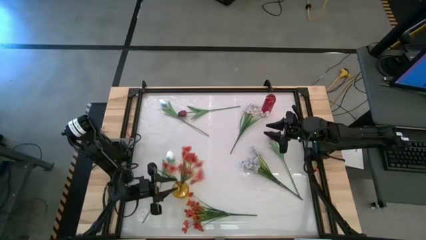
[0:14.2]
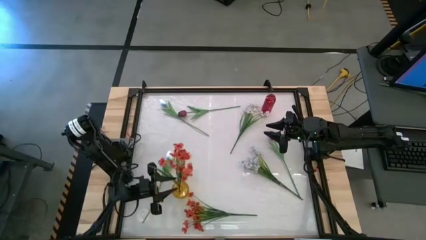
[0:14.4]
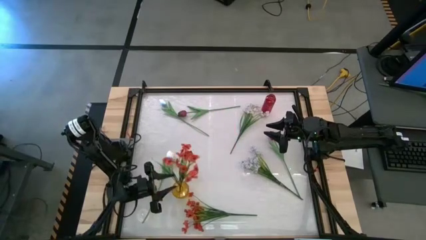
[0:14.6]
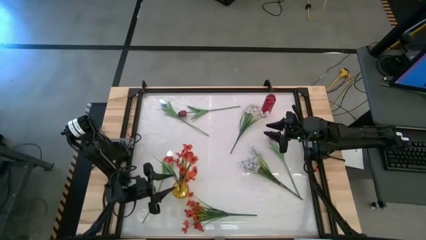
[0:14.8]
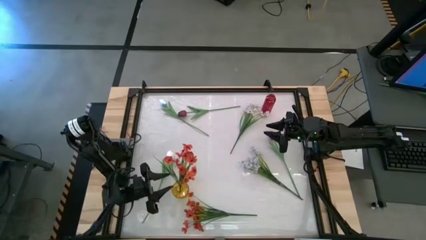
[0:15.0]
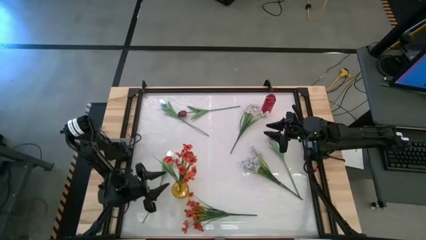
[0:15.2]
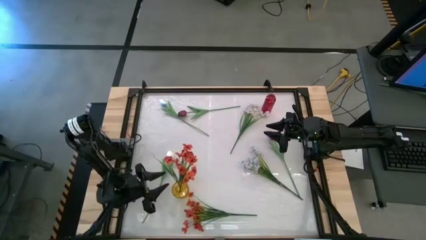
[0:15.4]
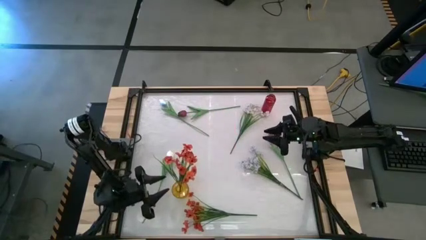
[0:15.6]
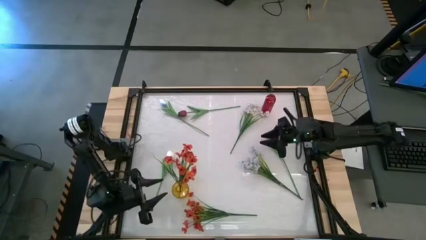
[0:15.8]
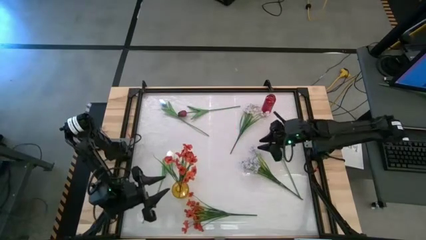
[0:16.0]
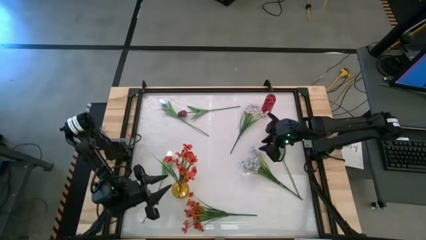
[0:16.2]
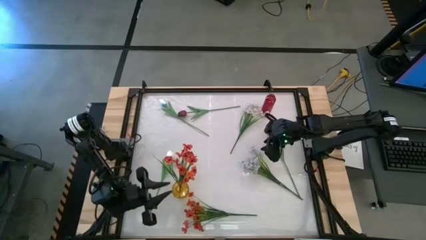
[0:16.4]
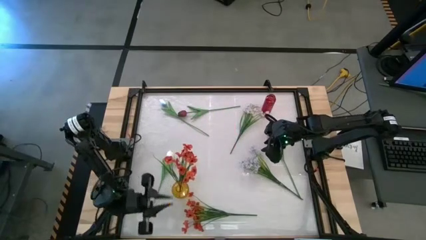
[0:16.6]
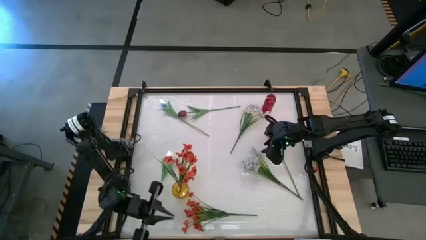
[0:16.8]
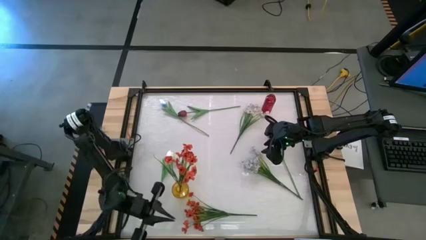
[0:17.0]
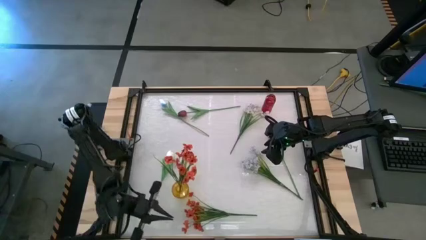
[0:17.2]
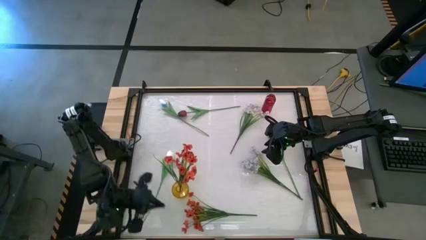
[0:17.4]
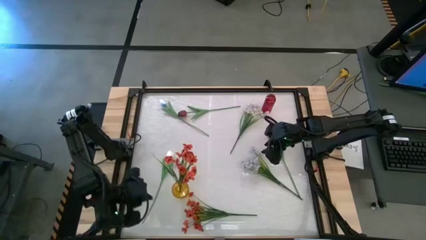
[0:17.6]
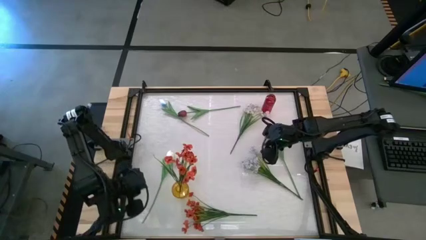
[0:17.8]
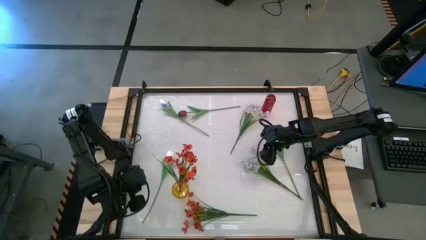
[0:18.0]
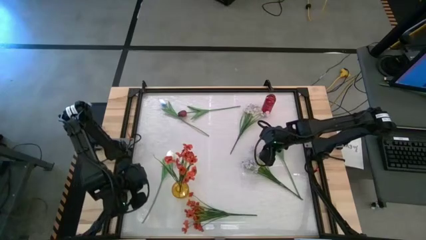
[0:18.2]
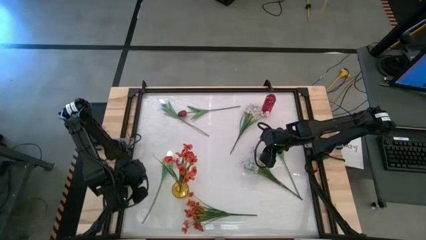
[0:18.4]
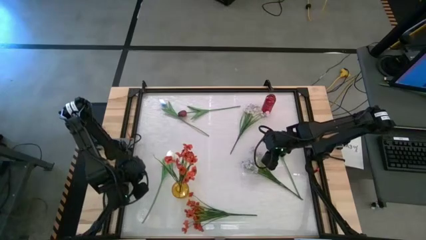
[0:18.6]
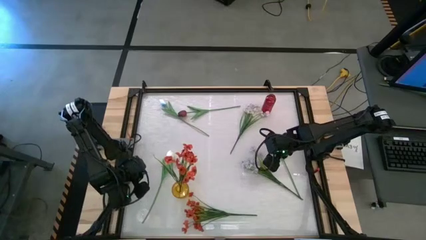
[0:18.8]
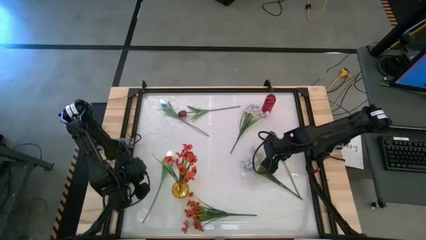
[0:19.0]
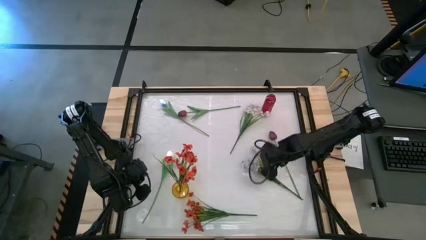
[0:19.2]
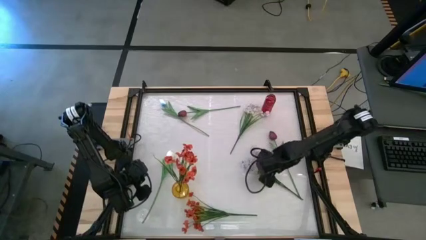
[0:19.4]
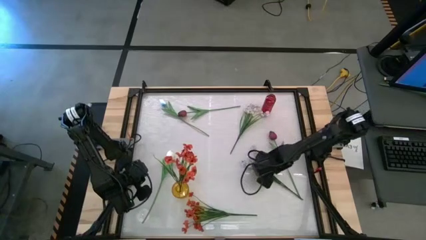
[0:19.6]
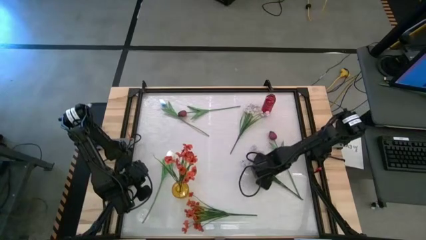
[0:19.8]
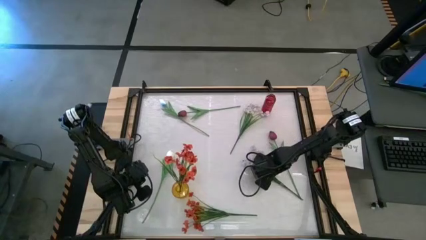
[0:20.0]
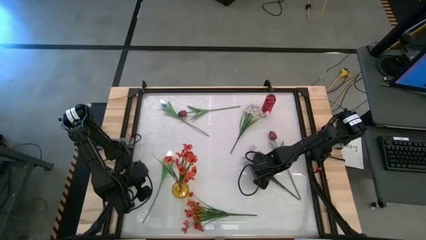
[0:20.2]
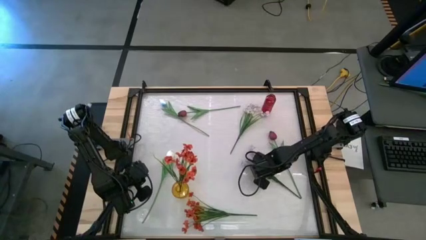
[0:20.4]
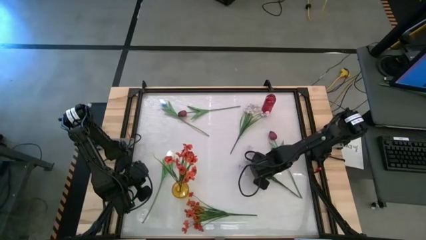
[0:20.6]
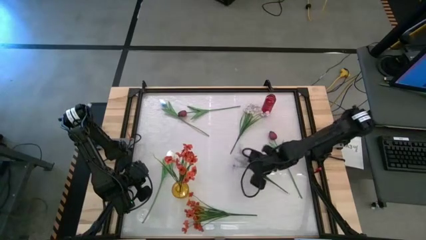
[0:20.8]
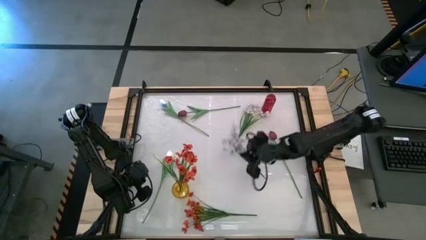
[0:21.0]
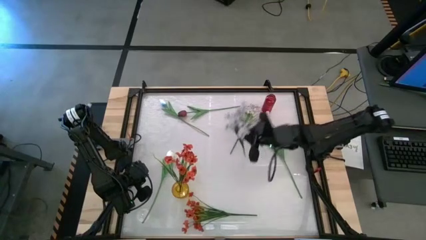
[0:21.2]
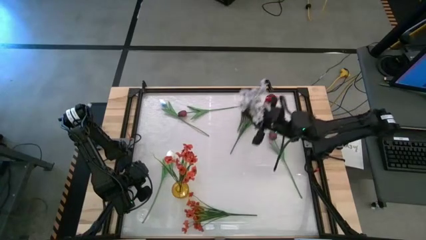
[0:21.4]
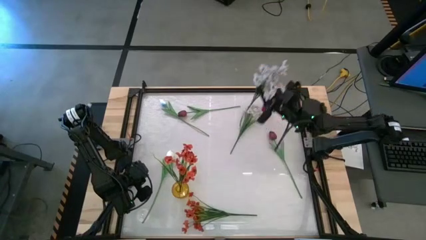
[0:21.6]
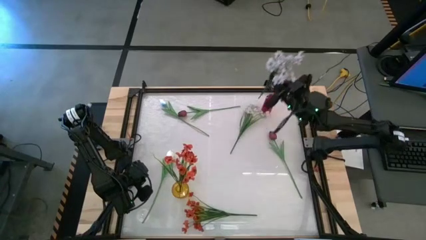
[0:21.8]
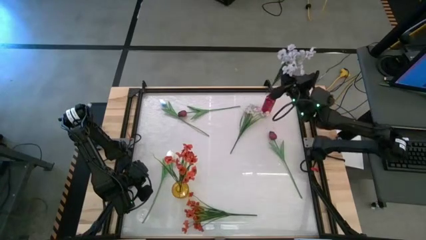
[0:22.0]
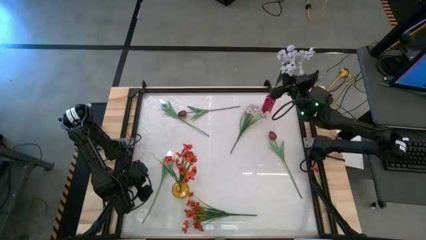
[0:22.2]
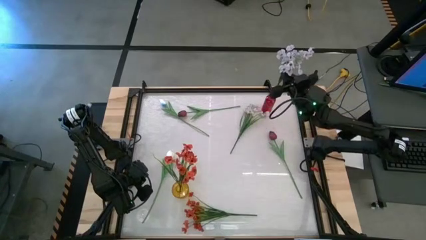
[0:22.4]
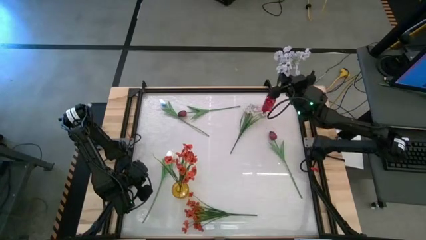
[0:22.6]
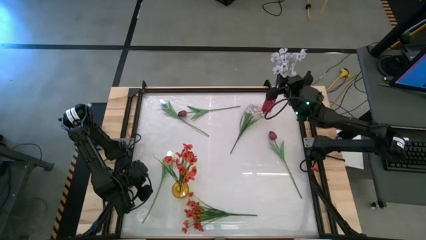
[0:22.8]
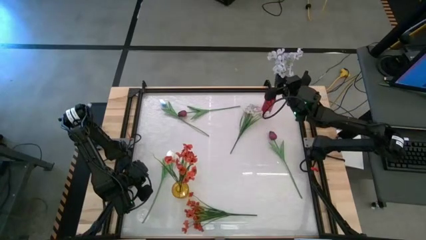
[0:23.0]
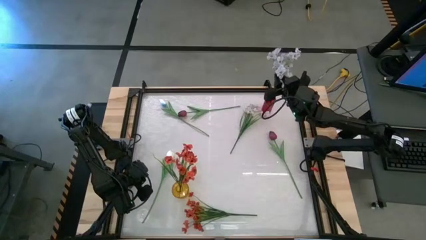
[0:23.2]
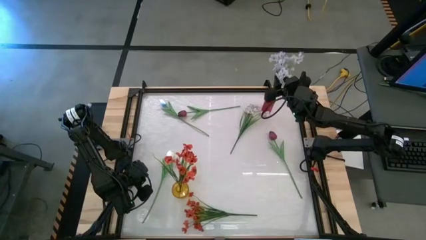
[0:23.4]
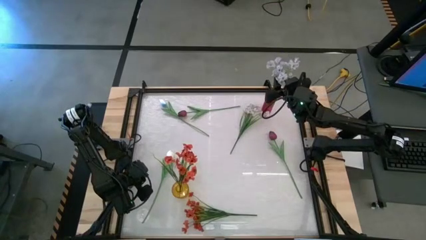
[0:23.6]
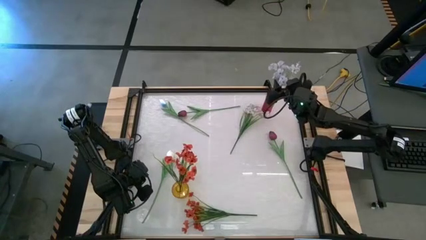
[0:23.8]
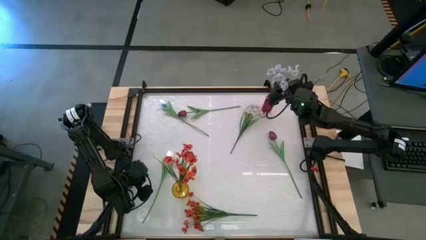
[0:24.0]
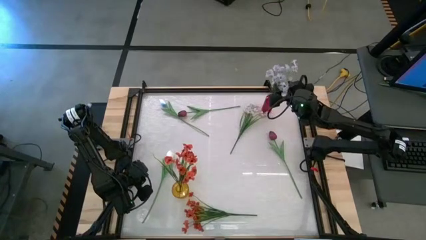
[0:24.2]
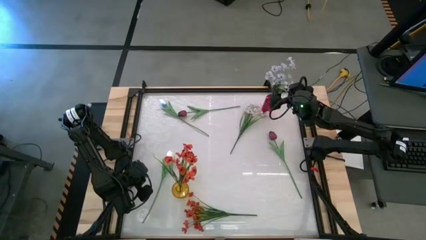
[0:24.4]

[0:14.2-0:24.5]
Task: Sort flowers into vase by color
Put the bottom white flowers into the red vase
